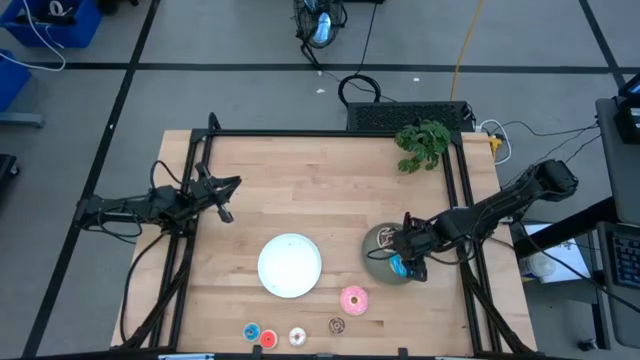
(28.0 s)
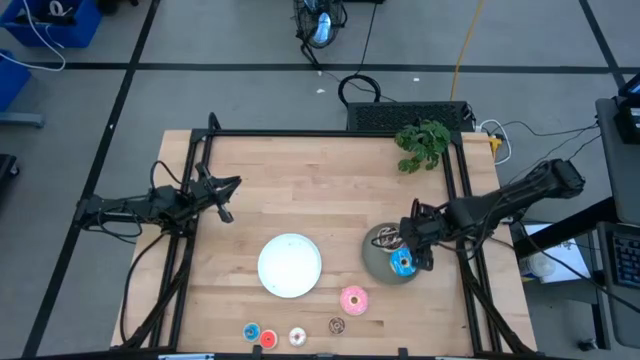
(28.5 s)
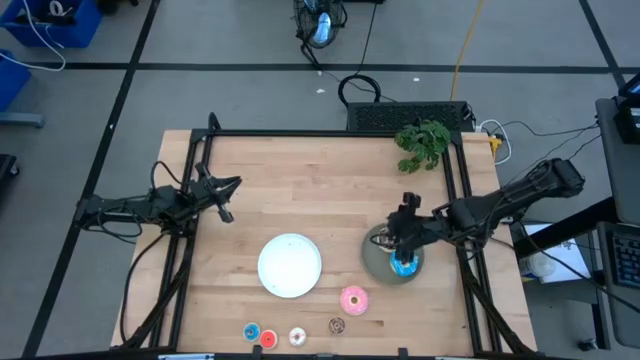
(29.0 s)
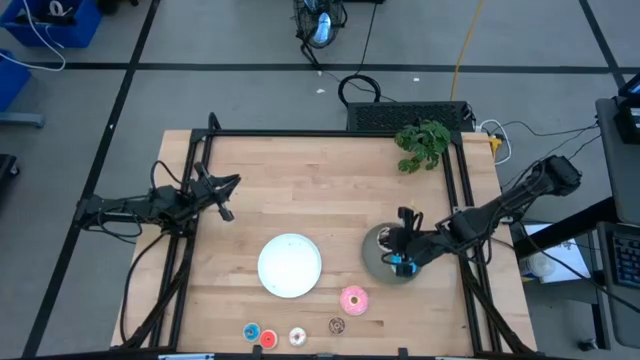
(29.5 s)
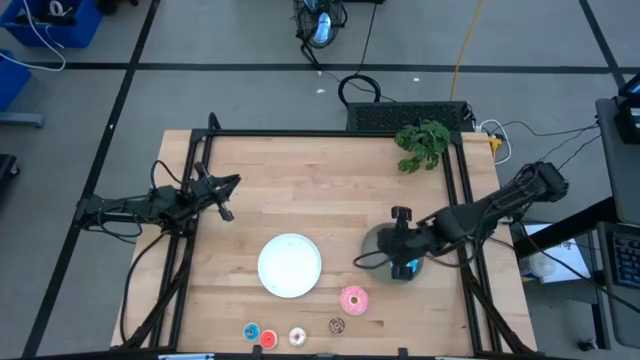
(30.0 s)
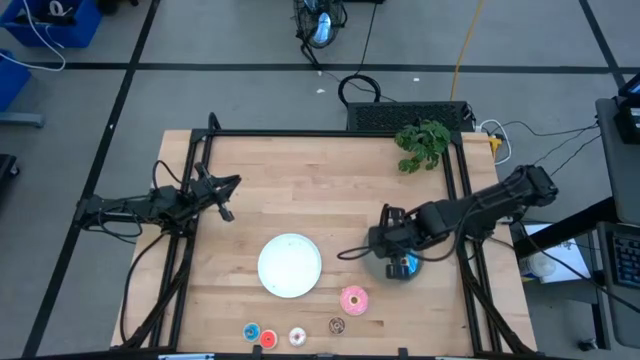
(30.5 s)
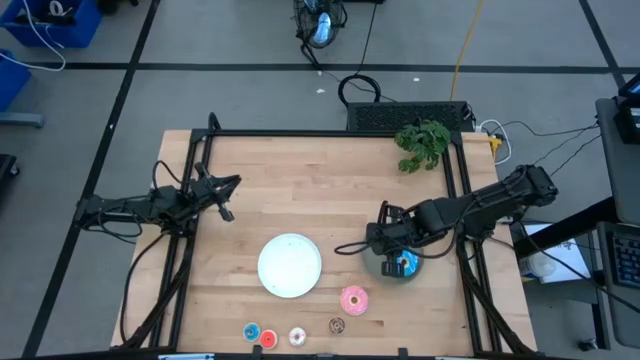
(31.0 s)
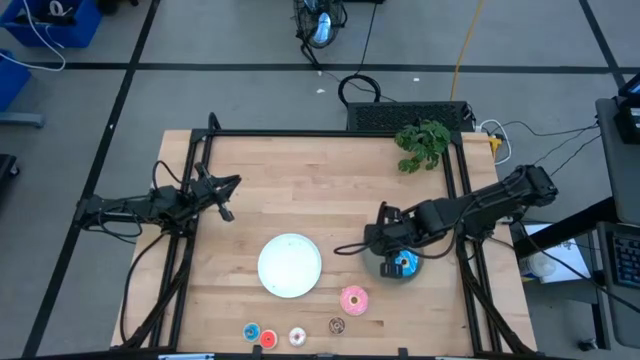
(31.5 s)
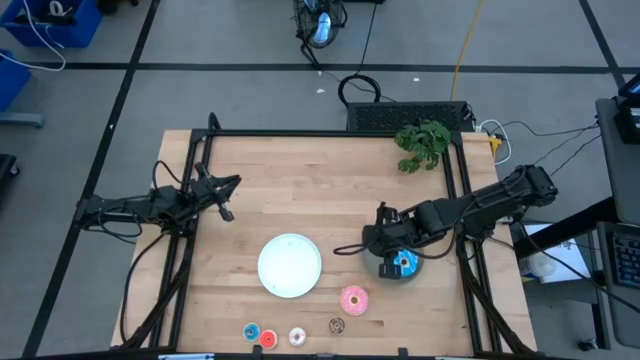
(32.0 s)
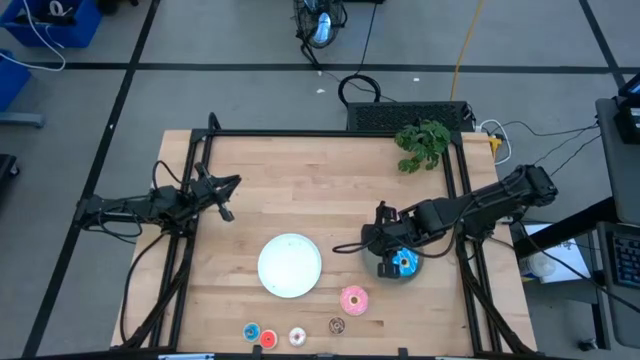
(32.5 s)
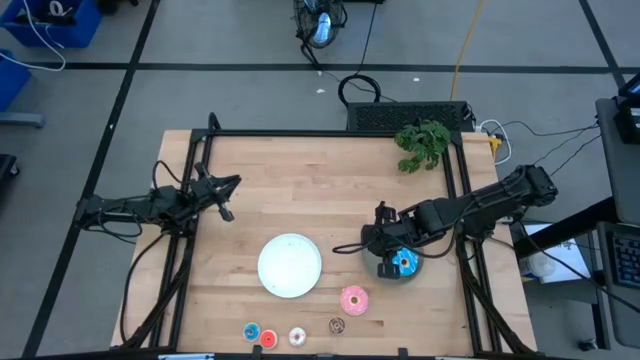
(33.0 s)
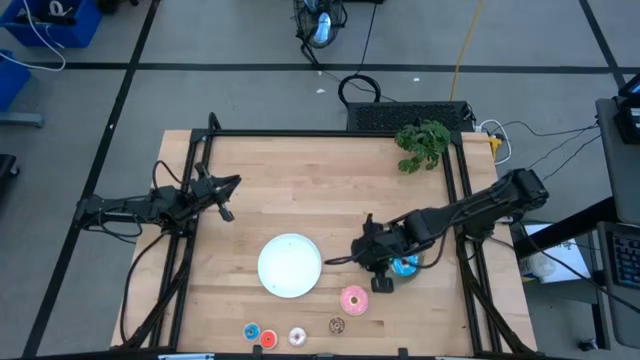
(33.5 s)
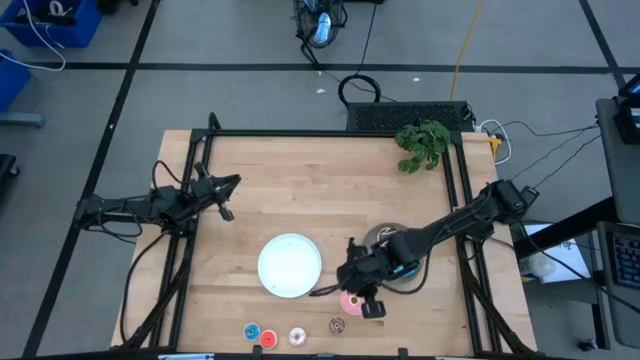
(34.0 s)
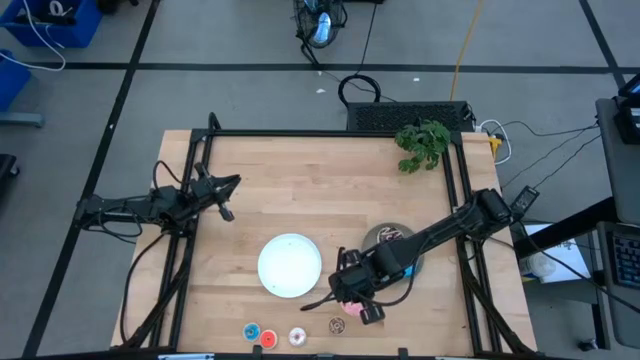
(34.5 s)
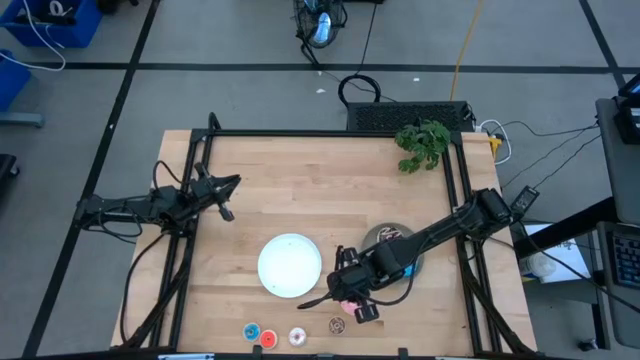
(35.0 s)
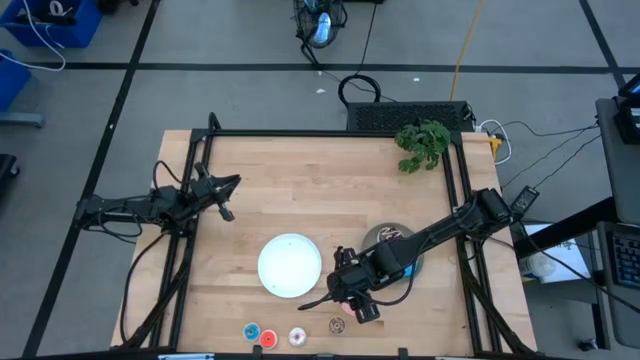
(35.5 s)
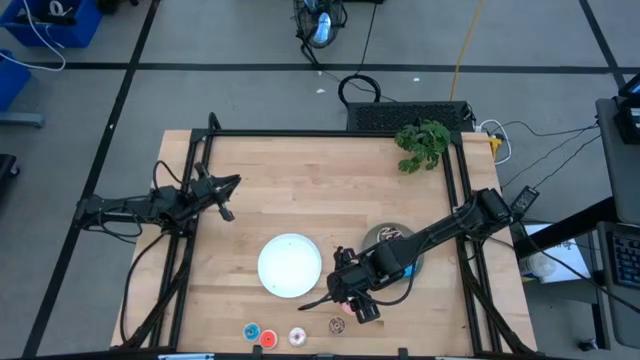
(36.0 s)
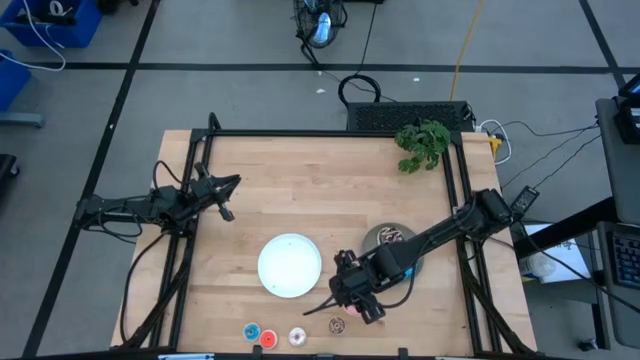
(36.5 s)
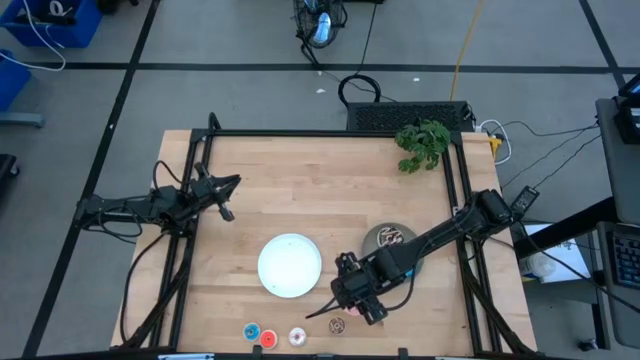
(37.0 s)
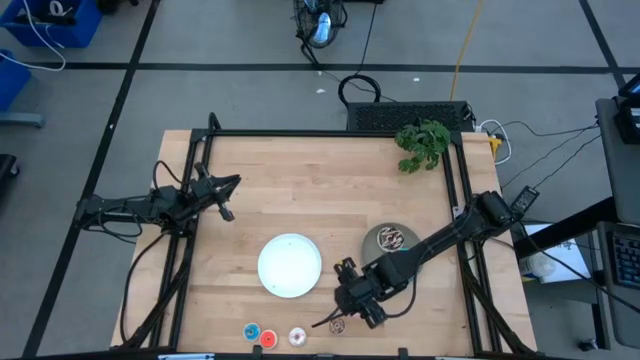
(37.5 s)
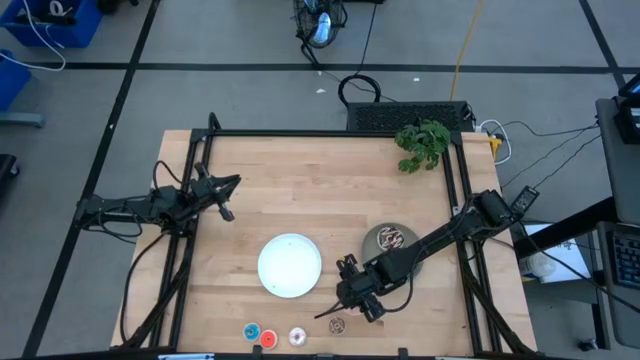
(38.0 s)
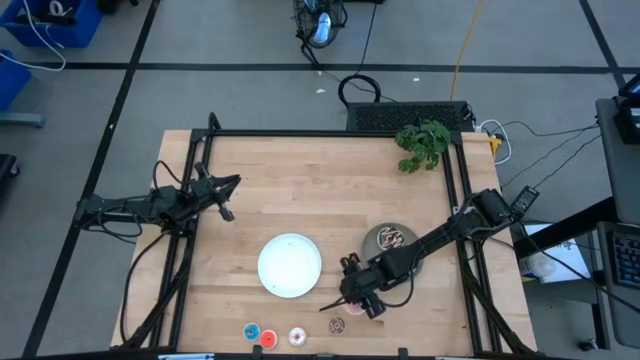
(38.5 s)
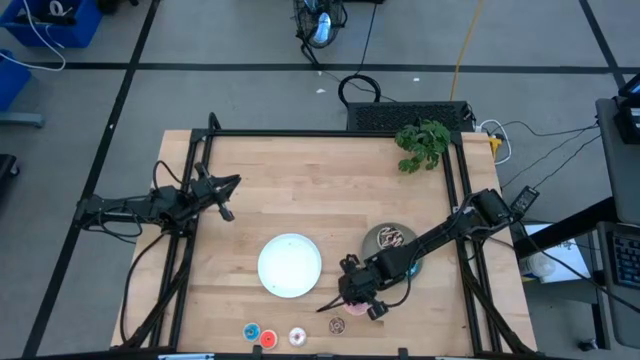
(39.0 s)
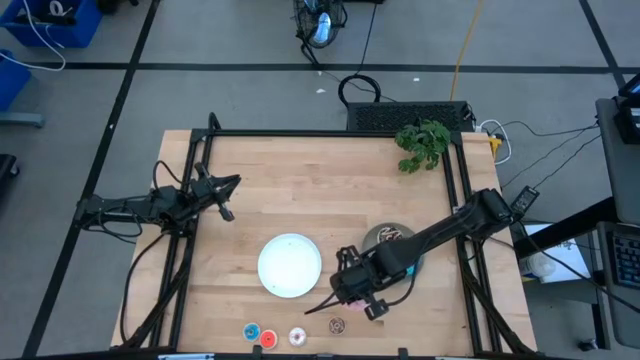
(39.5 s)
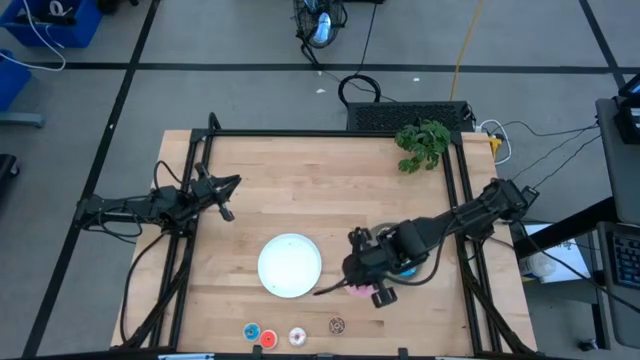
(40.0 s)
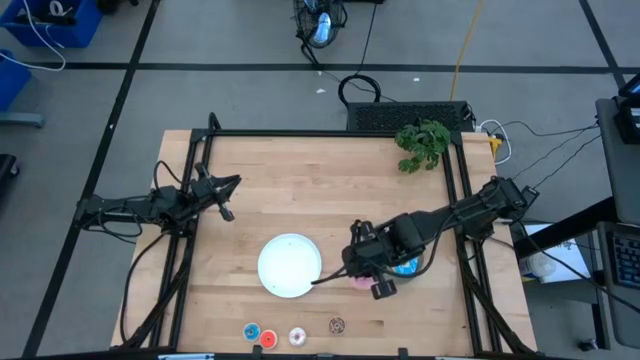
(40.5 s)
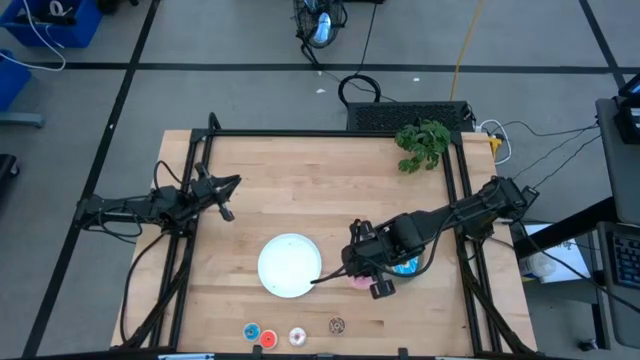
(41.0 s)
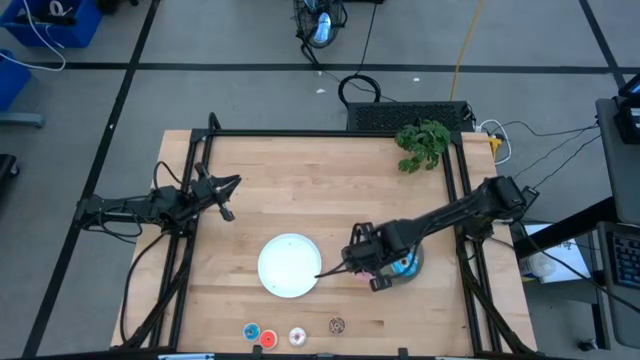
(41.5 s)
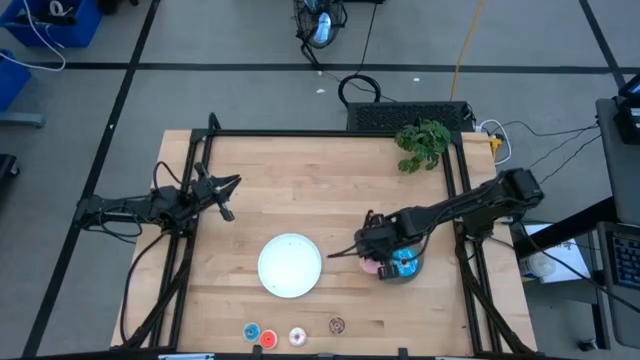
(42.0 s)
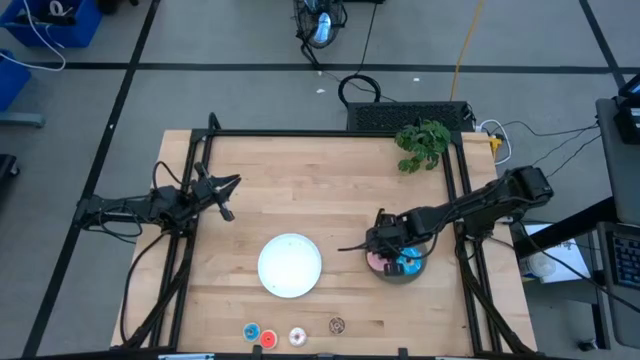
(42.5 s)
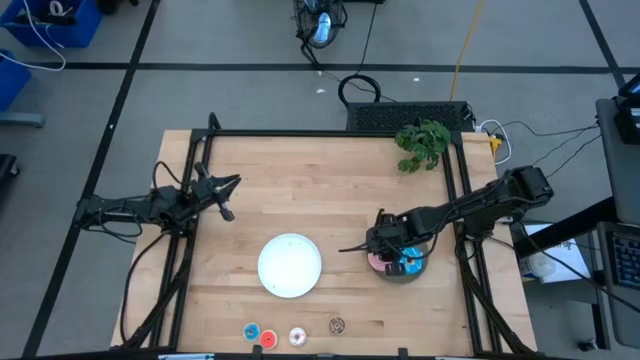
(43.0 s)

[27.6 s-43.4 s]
Task: Pick & Place donuts
Put the large pink donut on the gray plate

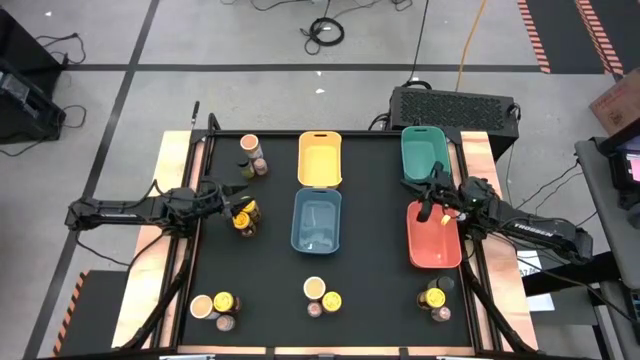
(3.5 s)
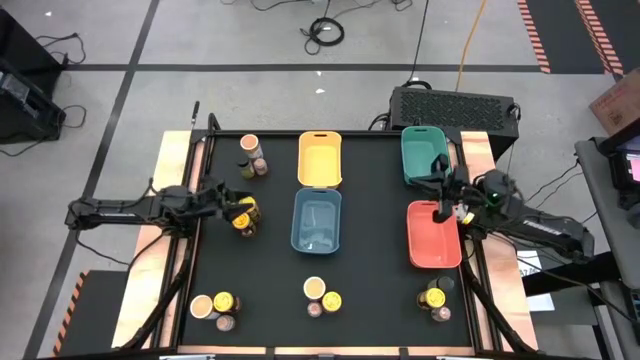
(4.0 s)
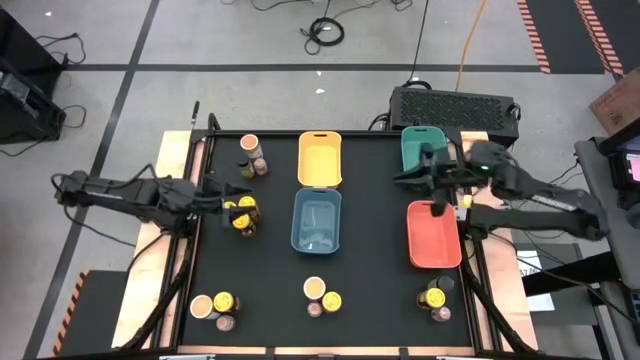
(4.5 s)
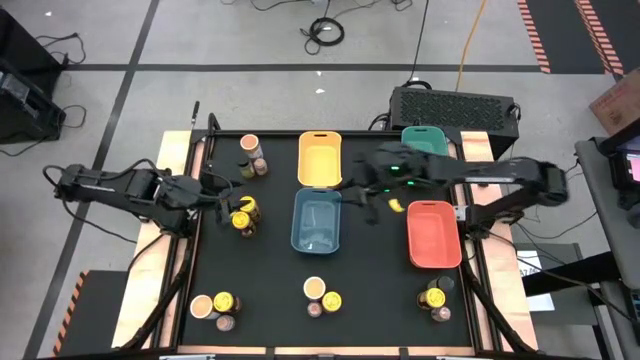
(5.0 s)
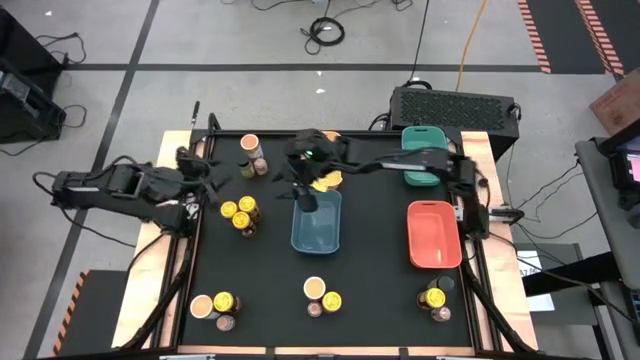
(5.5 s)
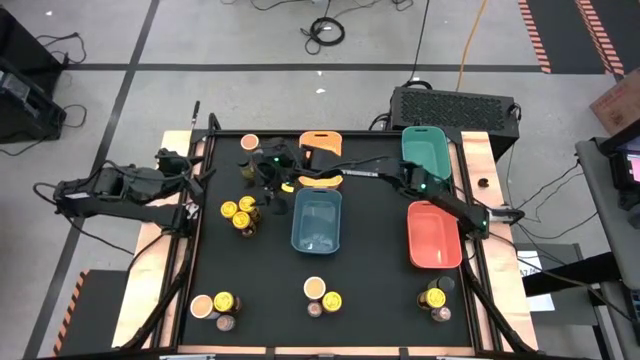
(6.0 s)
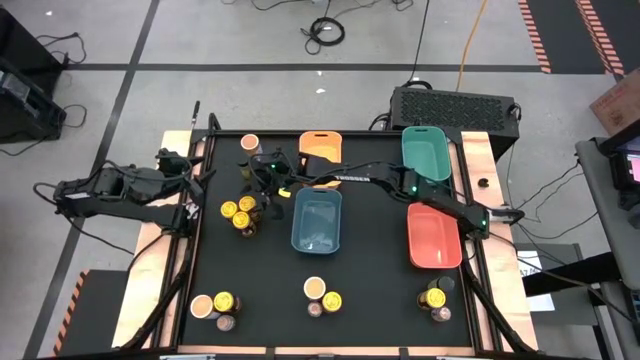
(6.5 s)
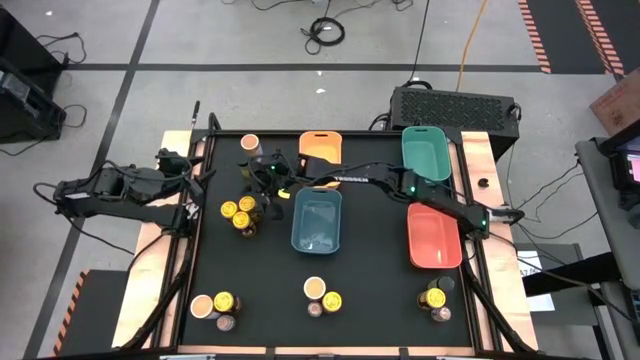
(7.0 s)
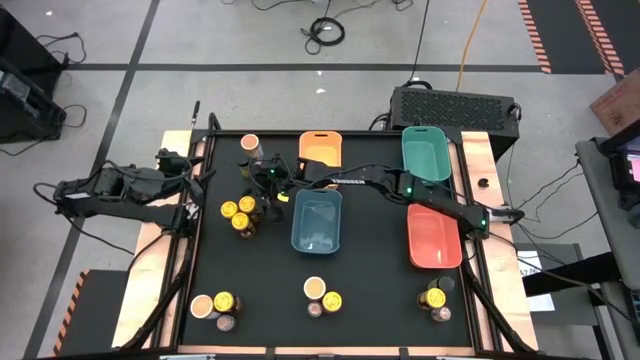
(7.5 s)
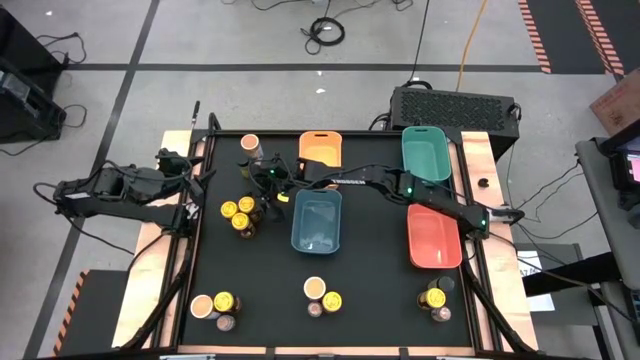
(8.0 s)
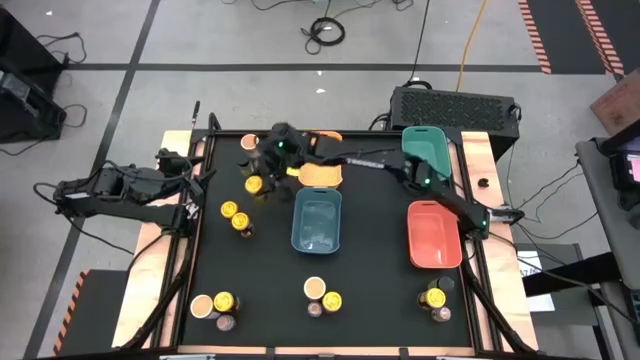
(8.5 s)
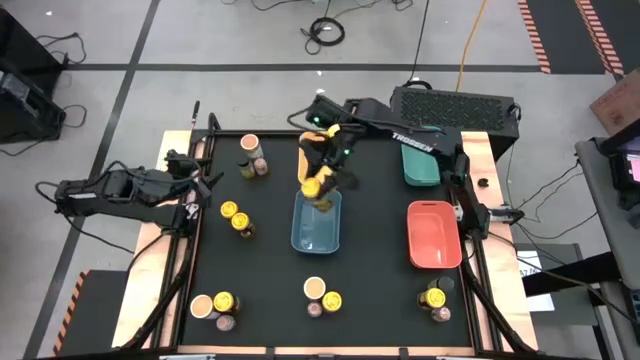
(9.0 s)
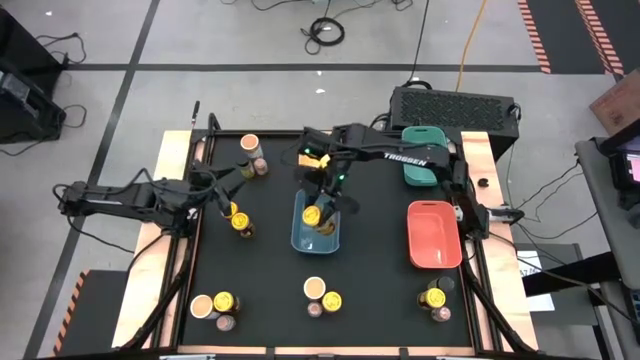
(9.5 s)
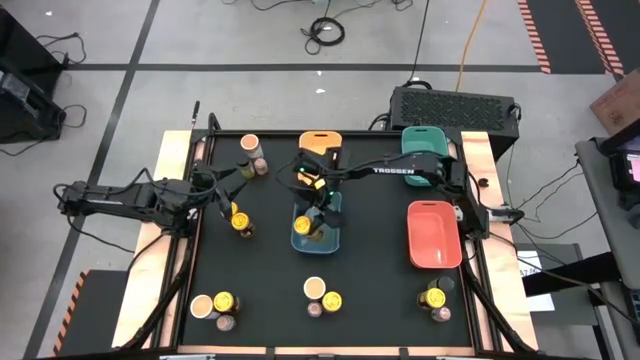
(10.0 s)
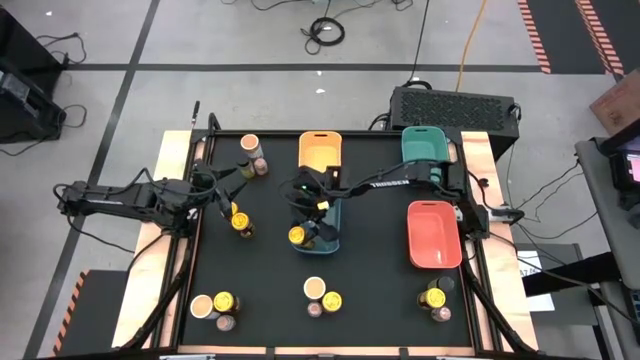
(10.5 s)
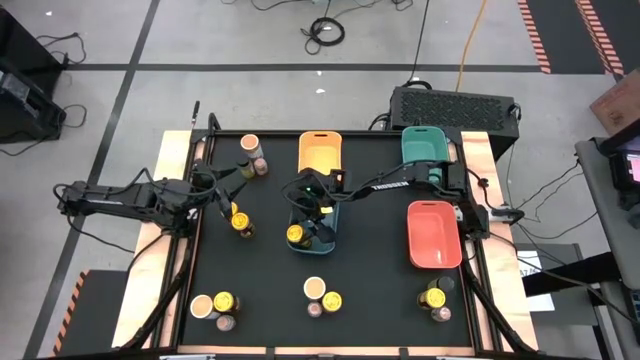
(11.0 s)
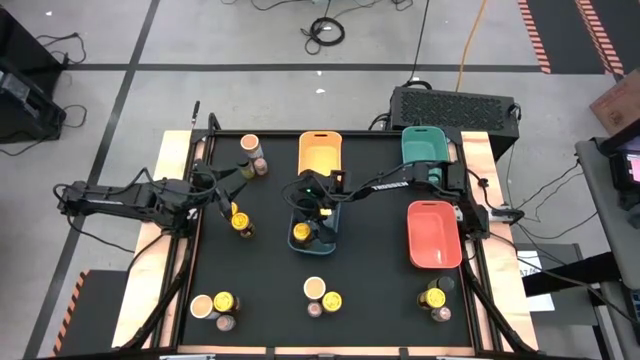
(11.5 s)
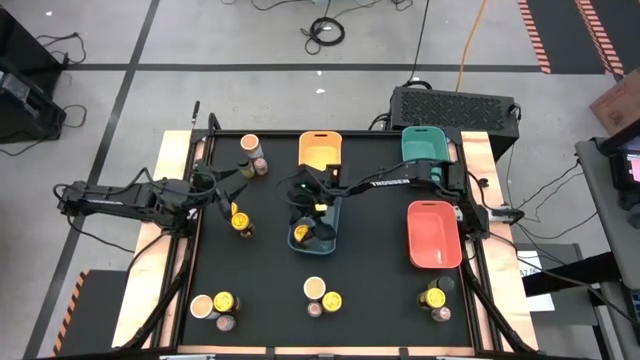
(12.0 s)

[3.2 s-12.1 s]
Task: Sort spices by type
Put the yellow seasoning bottle into the dark blue bin
